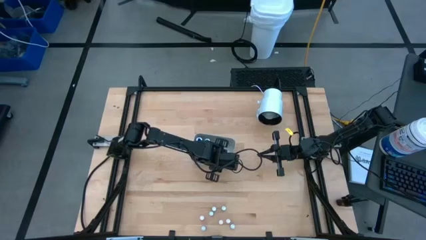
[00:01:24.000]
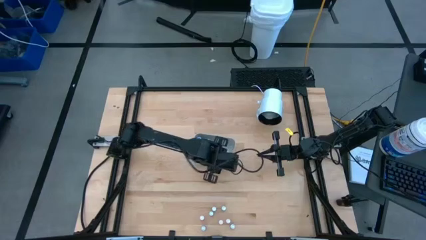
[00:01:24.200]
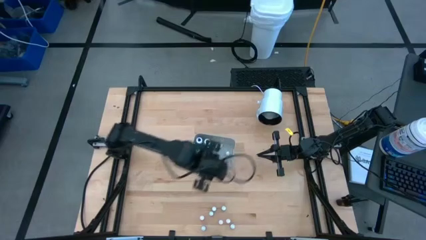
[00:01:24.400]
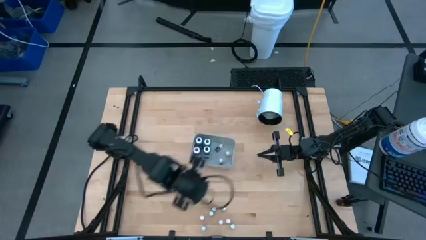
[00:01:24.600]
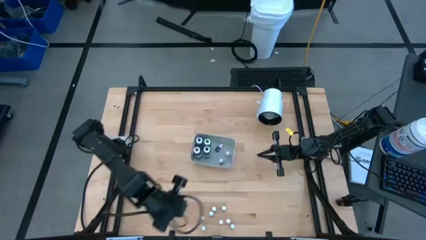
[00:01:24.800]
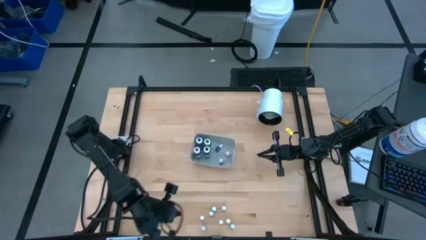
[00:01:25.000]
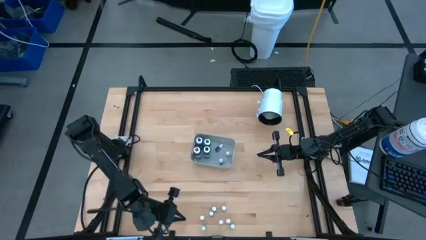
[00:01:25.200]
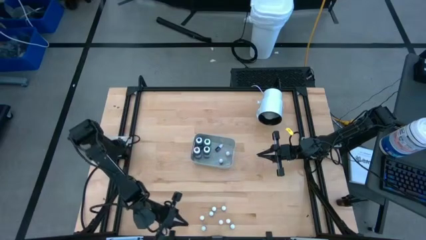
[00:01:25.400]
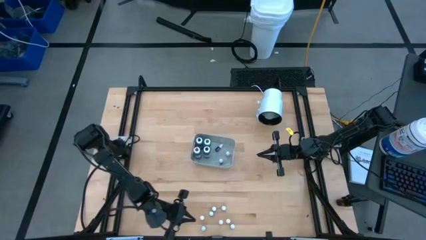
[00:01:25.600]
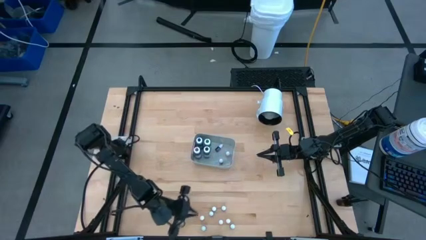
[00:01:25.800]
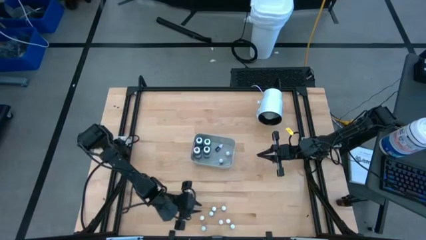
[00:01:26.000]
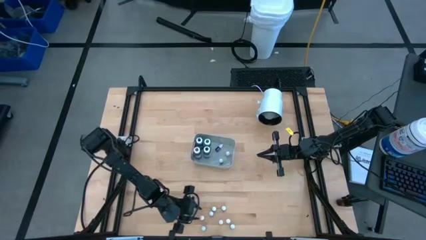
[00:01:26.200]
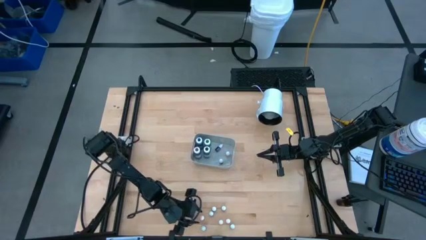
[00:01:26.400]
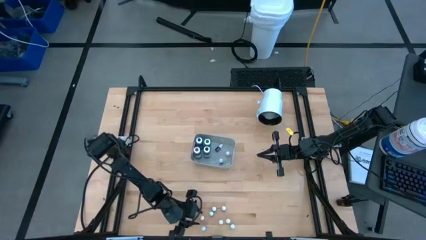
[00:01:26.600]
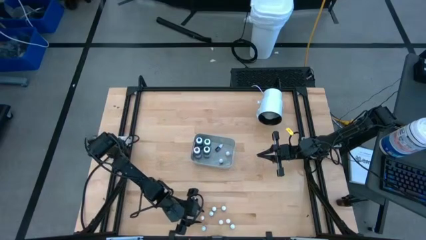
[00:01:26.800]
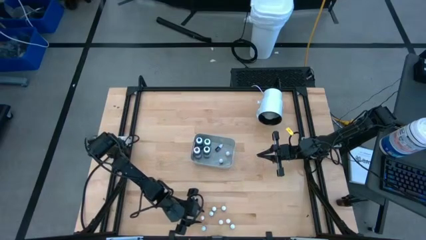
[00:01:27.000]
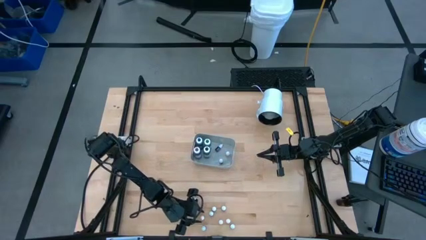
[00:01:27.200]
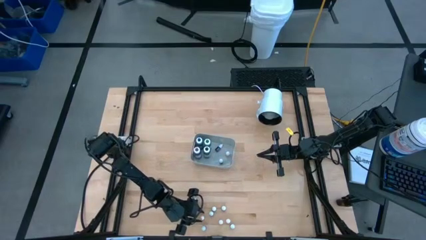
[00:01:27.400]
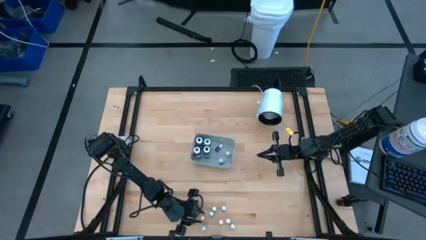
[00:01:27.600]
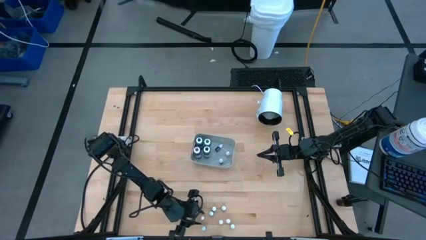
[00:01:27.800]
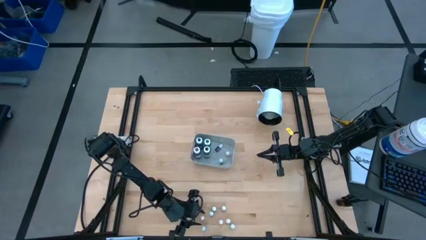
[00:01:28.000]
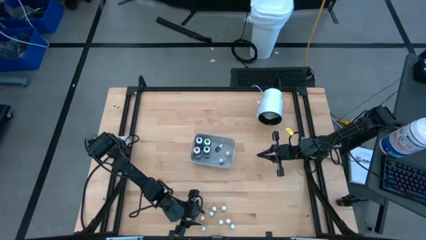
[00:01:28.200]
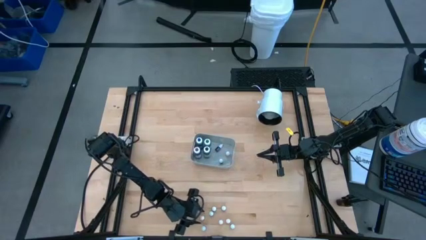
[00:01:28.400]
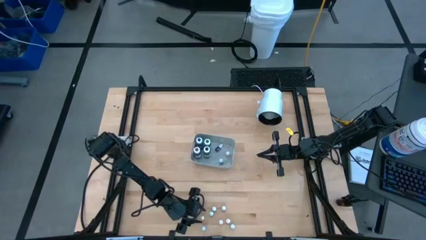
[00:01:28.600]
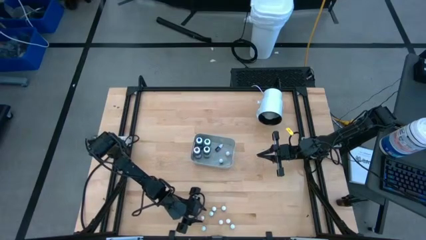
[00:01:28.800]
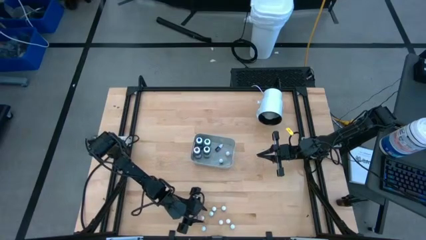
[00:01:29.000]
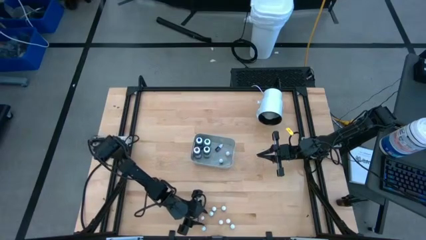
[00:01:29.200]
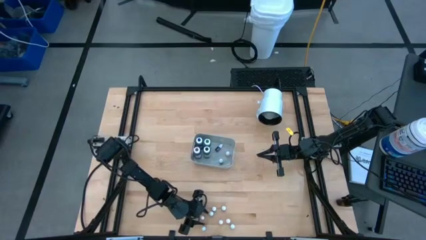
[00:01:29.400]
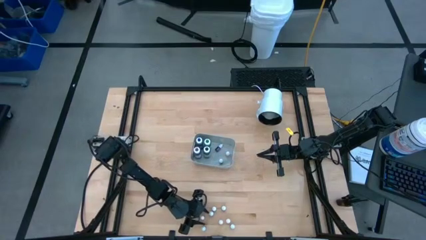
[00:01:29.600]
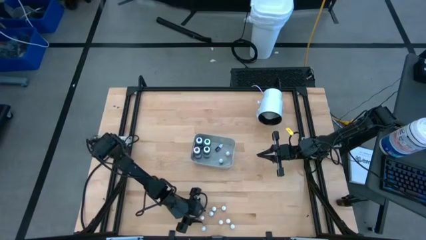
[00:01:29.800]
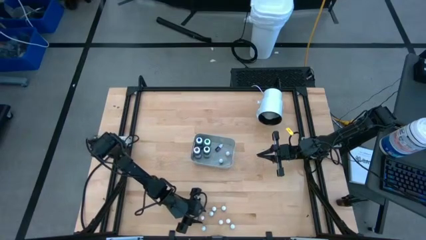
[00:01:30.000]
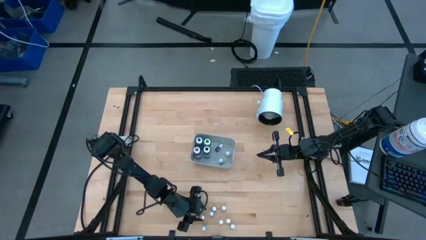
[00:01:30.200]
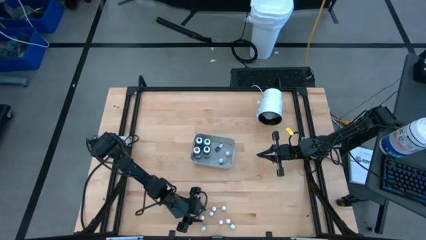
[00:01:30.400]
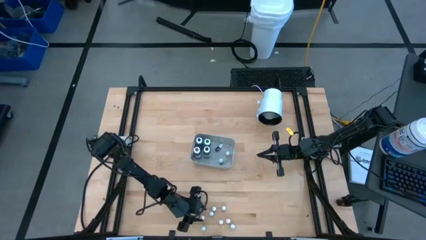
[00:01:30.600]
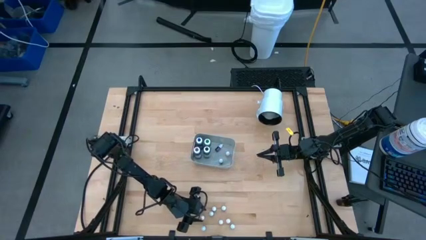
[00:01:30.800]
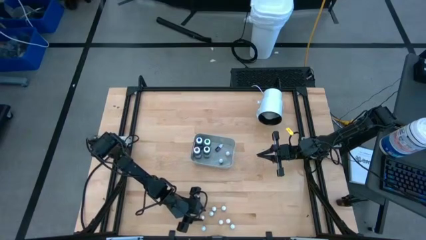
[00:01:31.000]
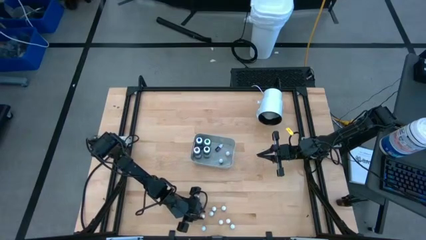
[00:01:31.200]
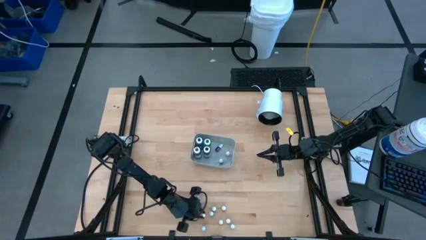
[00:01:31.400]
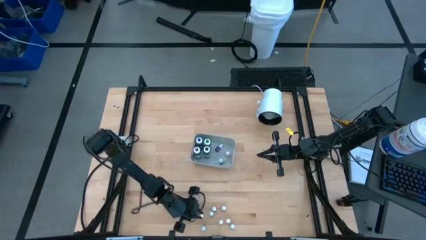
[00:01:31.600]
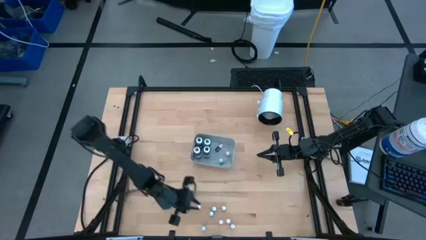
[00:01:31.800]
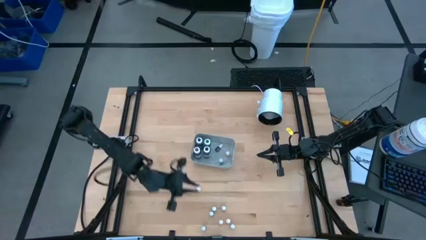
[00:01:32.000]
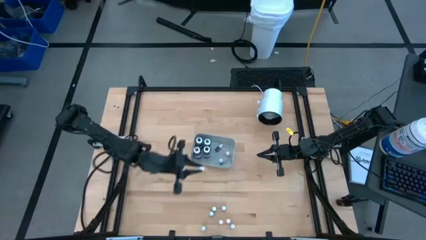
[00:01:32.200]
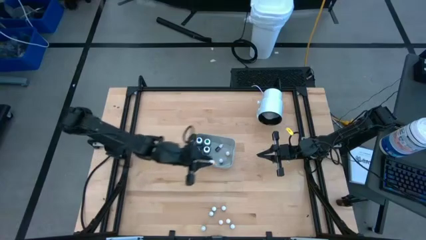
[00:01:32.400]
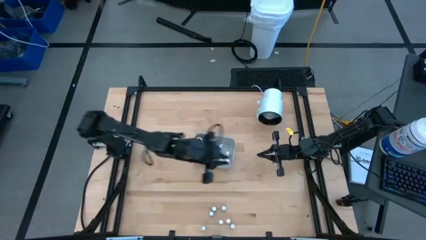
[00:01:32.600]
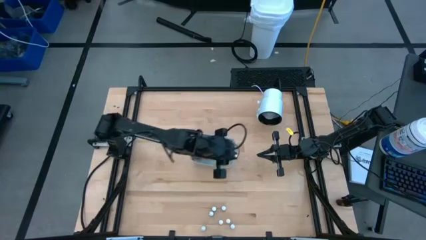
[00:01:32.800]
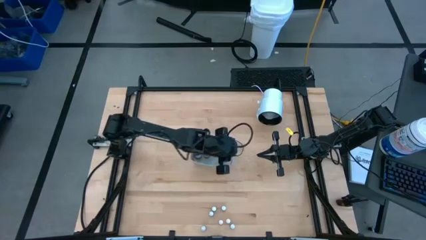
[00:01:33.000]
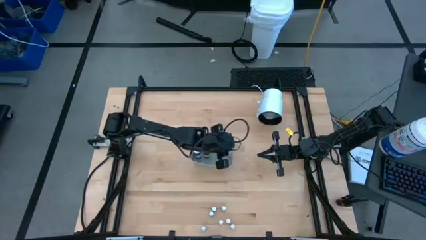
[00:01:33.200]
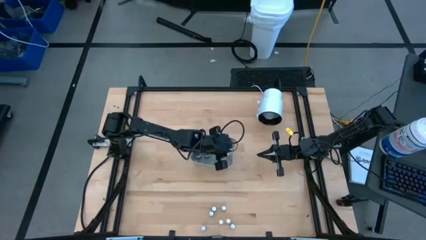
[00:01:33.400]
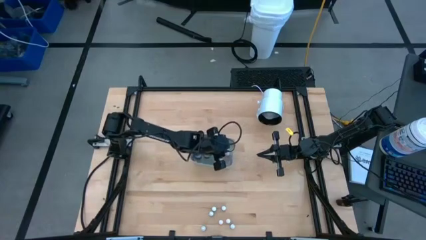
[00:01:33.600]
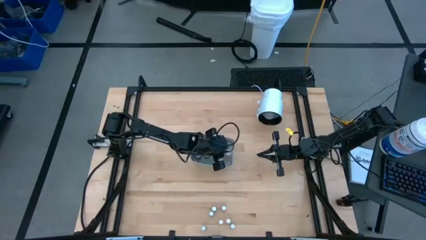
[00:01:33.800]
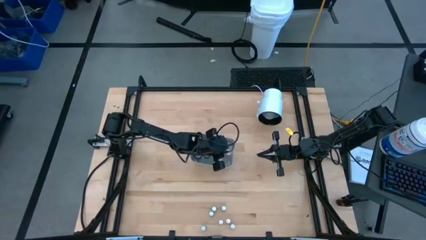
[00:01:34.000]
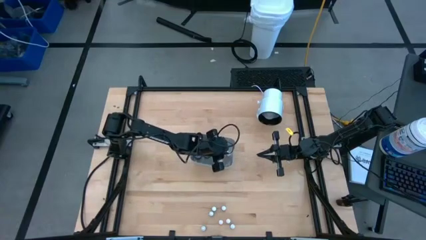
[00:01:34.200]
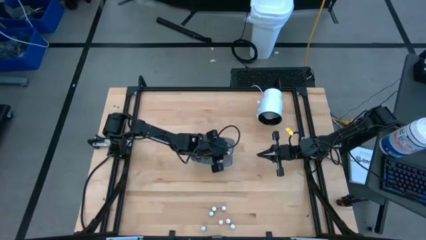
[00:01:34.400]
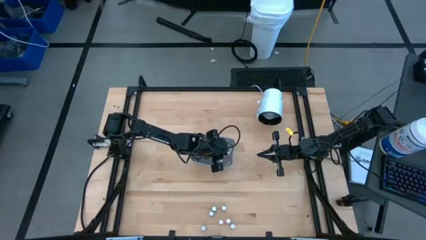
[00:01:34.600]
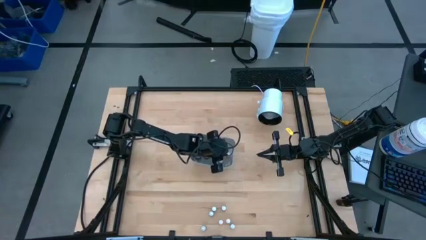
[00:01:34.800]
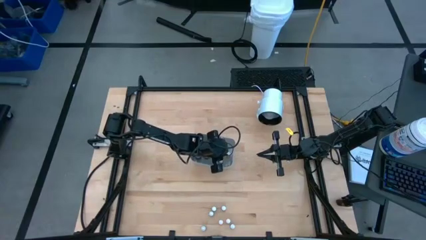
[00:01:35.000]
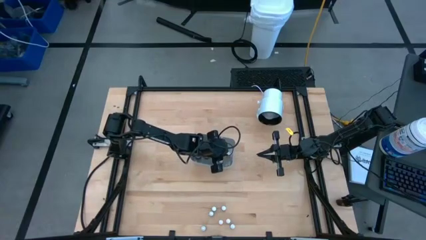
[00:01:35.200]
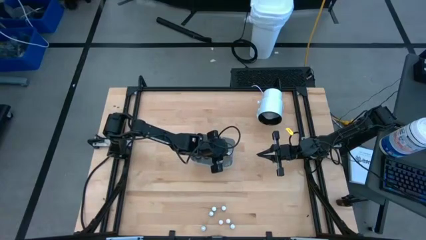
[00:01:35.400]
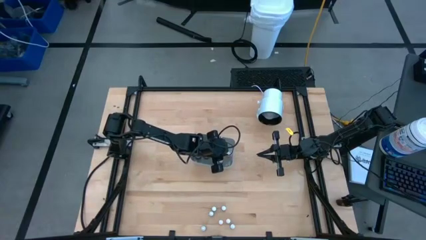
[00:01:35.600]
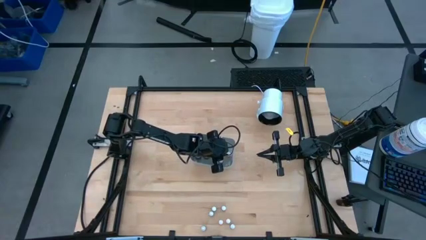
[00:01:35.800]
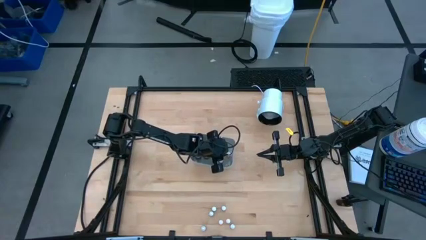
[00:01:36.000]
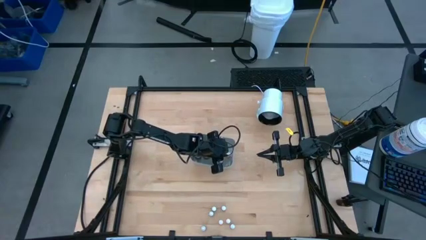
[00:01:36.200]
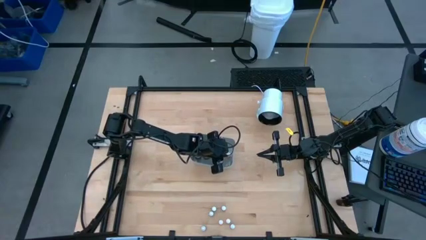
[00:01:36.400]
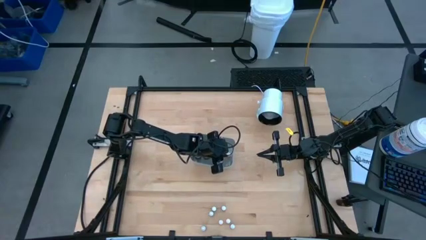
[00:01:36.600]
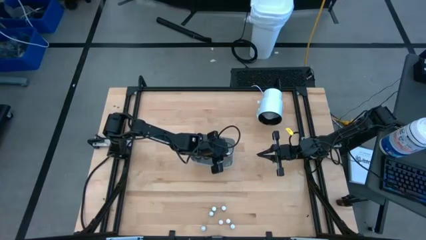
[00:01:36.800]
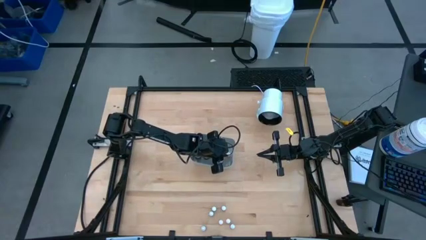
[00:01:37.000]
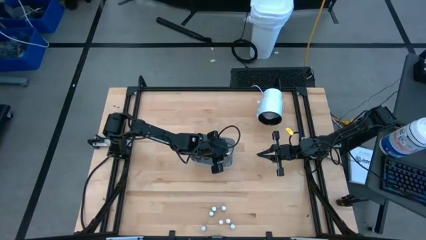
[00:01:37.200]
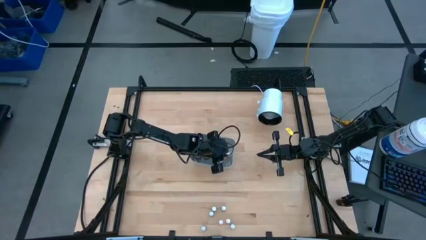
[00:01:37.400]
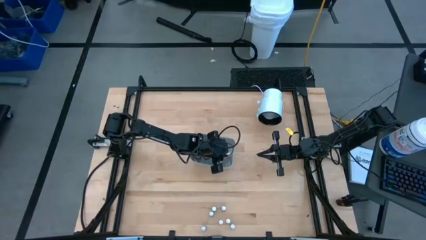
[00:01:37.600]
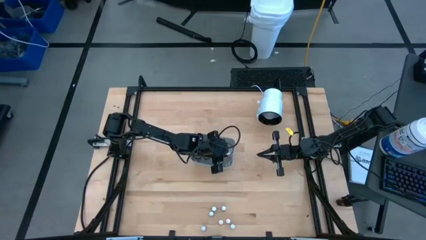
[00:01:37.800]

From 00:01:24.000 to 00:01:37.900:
Task: Pick & Place food coloring
Put the orange food coloring bottle into the gray bin
